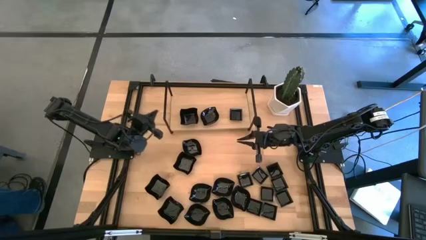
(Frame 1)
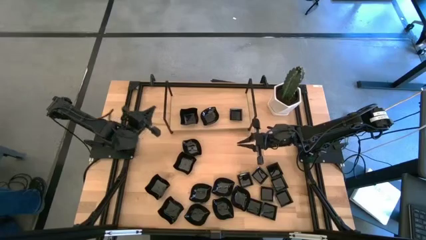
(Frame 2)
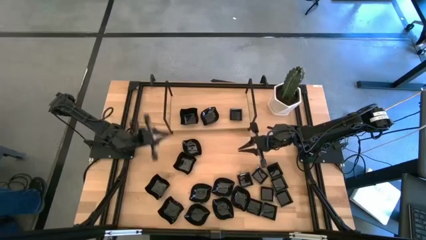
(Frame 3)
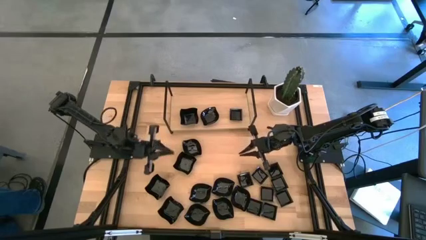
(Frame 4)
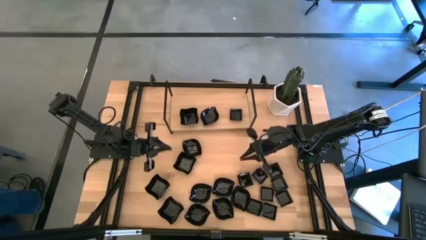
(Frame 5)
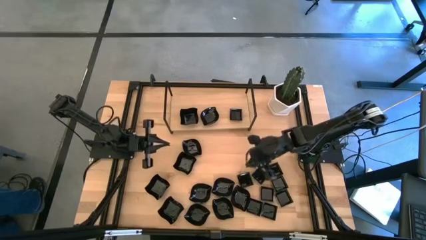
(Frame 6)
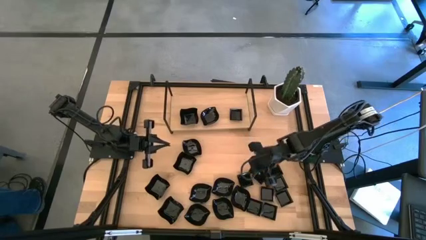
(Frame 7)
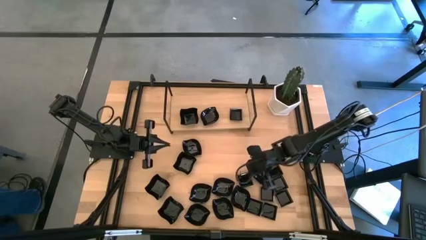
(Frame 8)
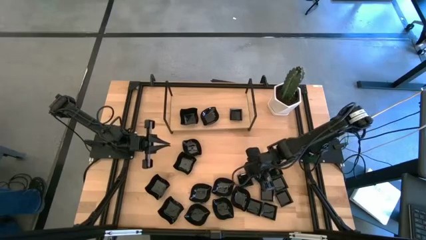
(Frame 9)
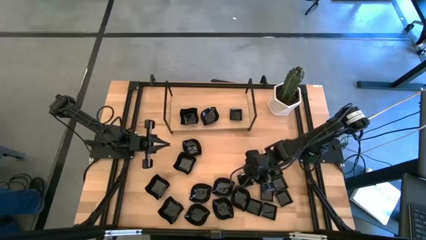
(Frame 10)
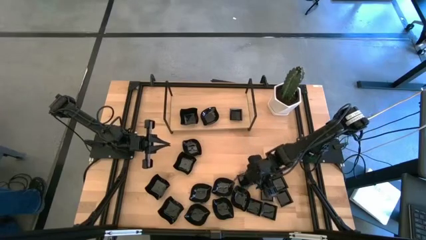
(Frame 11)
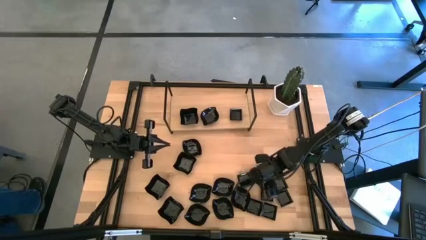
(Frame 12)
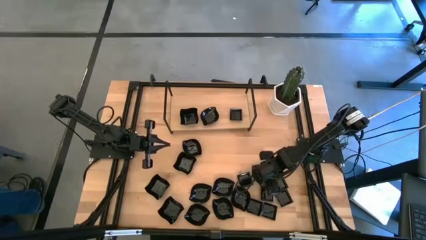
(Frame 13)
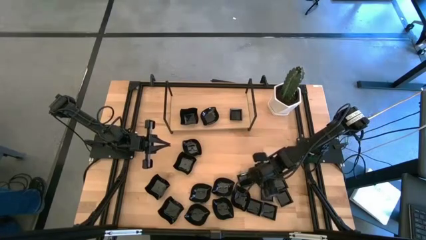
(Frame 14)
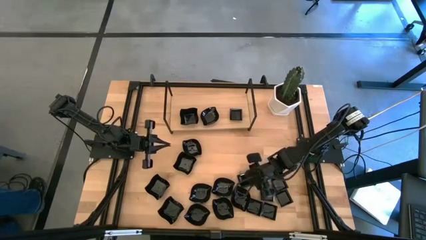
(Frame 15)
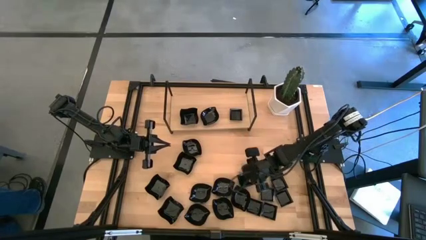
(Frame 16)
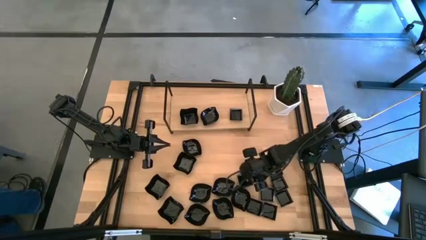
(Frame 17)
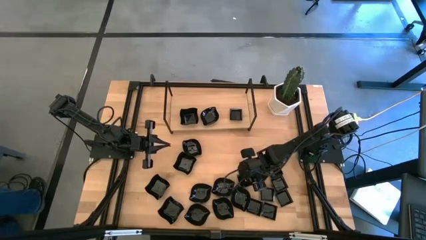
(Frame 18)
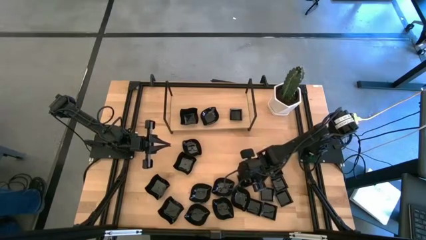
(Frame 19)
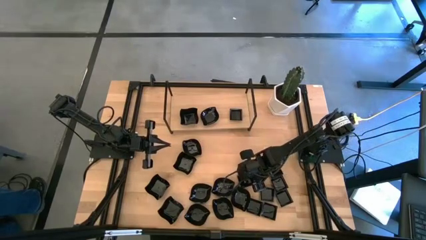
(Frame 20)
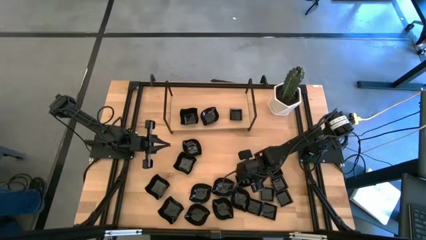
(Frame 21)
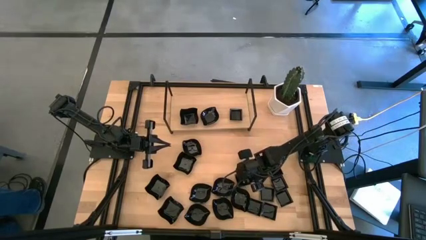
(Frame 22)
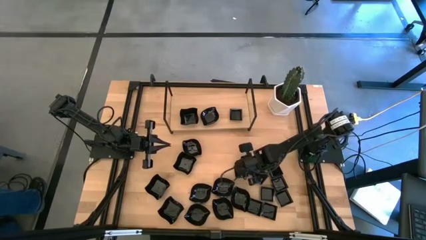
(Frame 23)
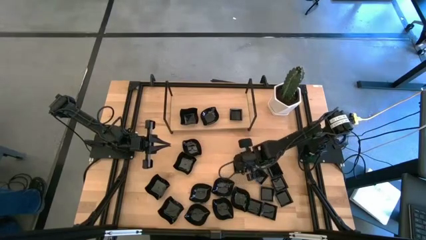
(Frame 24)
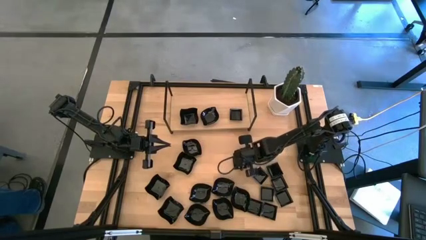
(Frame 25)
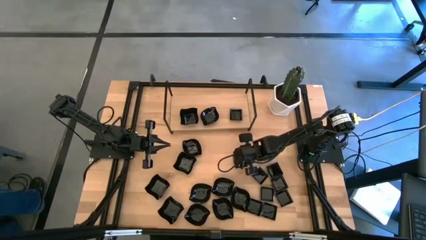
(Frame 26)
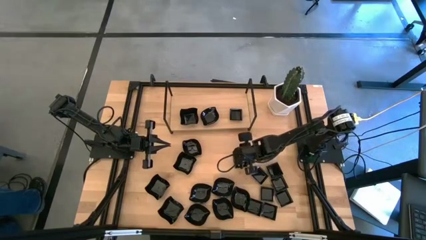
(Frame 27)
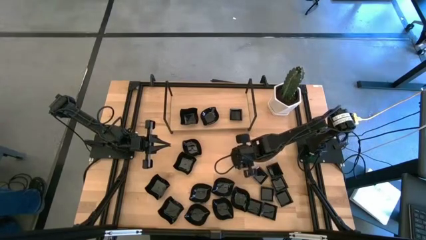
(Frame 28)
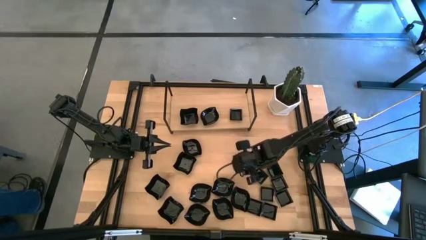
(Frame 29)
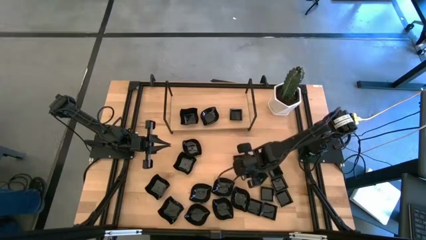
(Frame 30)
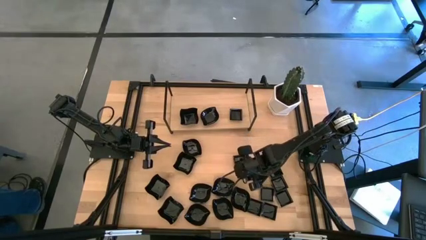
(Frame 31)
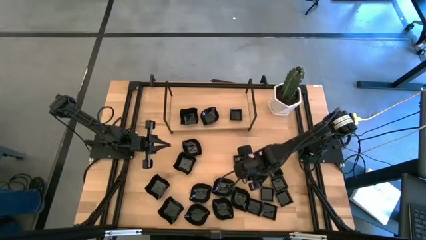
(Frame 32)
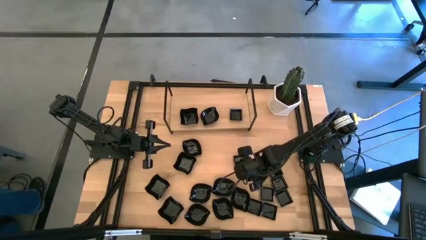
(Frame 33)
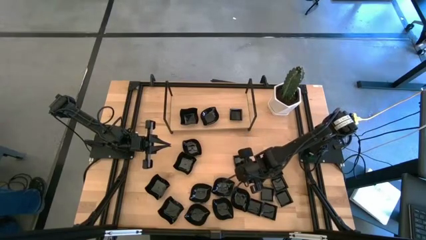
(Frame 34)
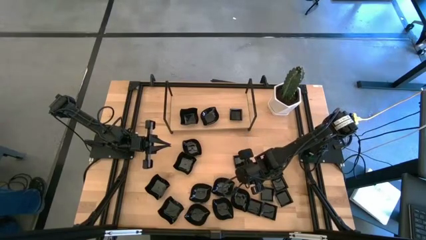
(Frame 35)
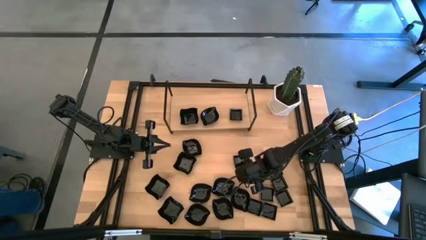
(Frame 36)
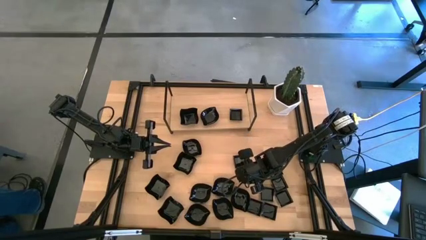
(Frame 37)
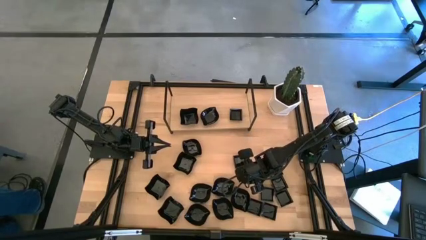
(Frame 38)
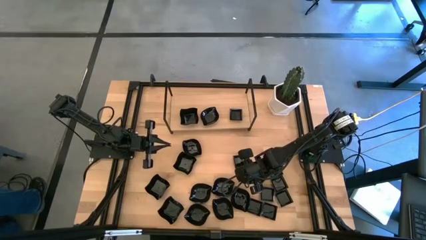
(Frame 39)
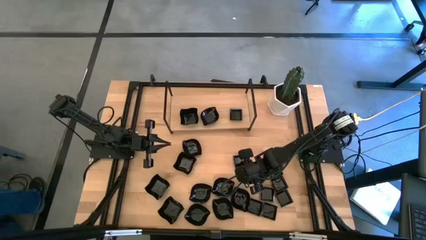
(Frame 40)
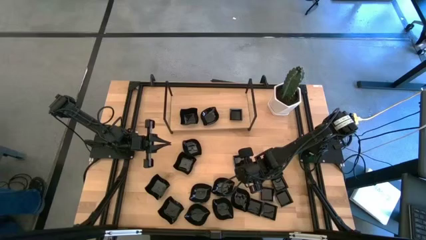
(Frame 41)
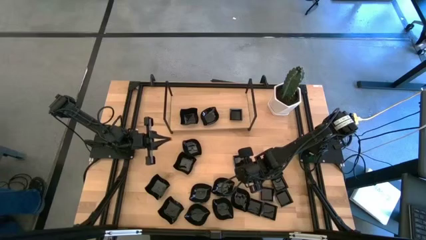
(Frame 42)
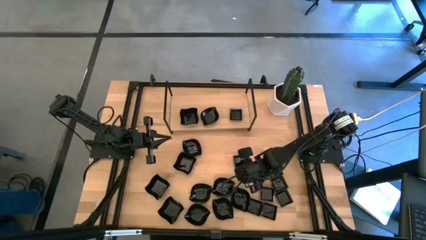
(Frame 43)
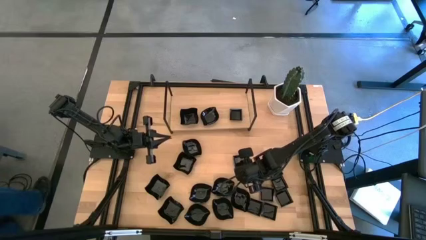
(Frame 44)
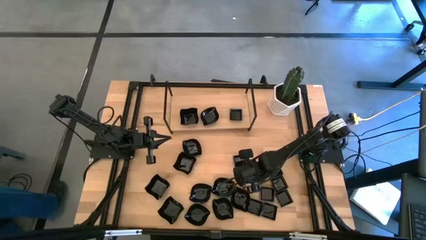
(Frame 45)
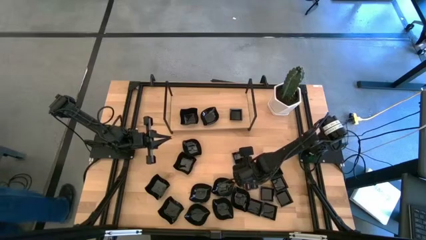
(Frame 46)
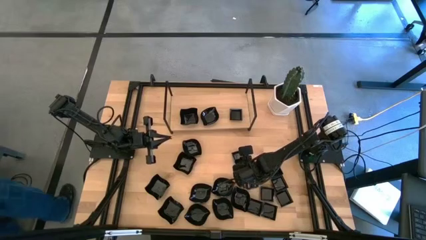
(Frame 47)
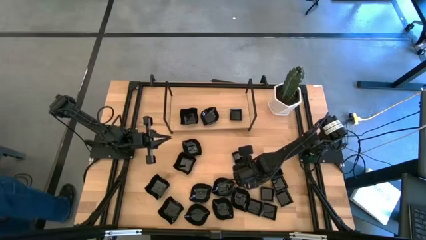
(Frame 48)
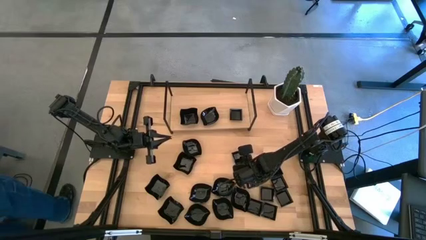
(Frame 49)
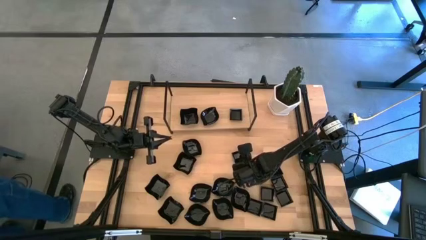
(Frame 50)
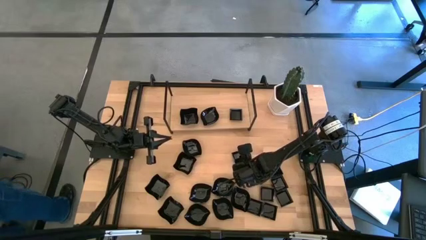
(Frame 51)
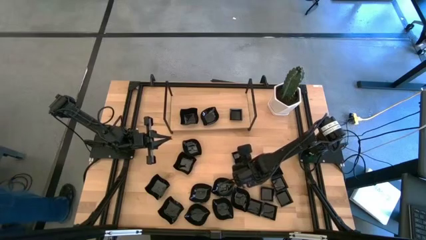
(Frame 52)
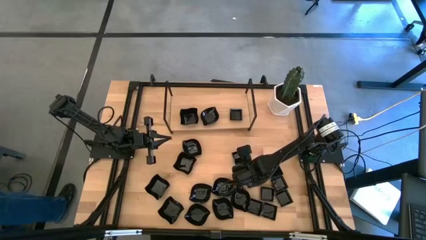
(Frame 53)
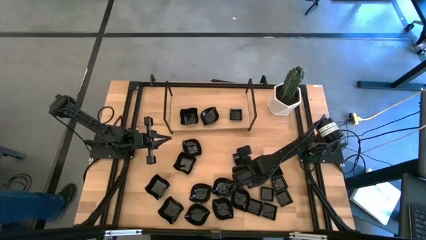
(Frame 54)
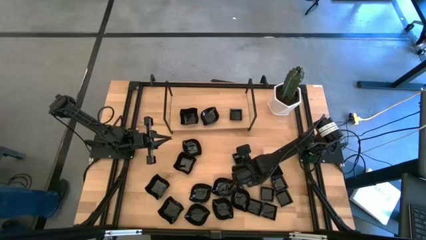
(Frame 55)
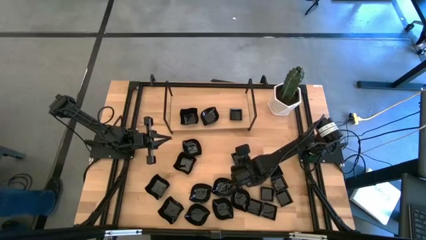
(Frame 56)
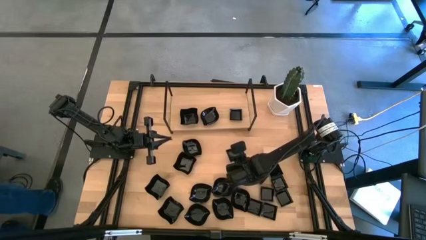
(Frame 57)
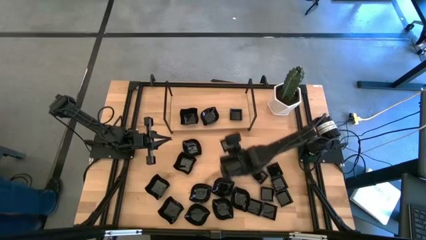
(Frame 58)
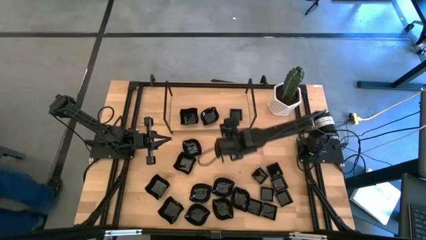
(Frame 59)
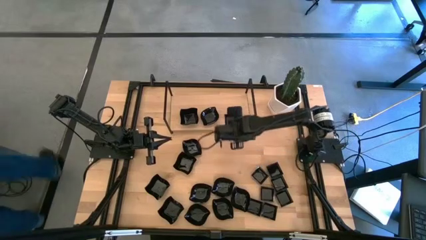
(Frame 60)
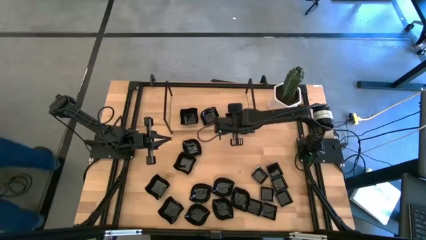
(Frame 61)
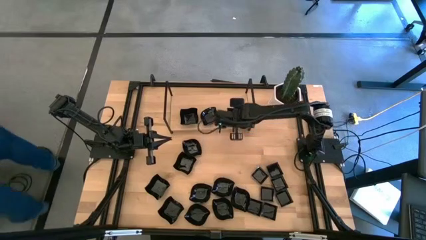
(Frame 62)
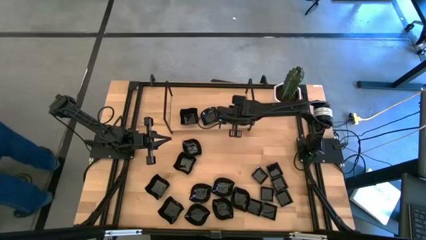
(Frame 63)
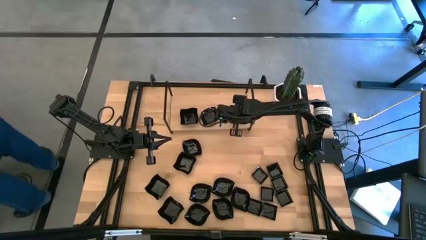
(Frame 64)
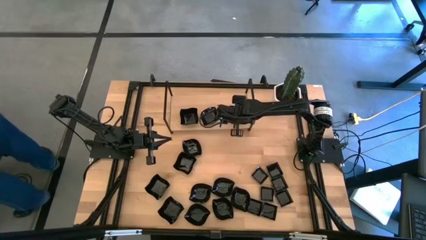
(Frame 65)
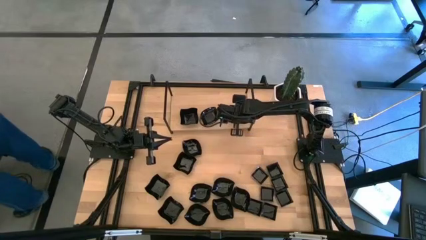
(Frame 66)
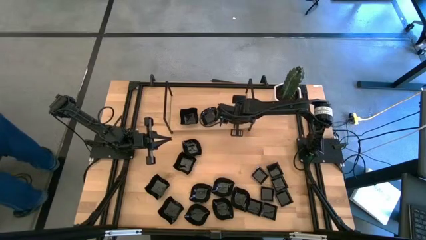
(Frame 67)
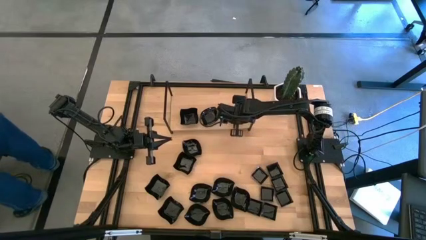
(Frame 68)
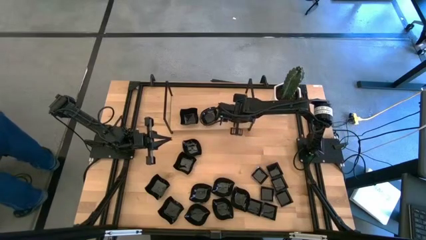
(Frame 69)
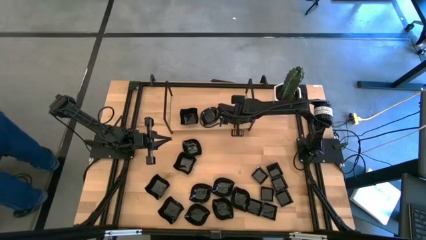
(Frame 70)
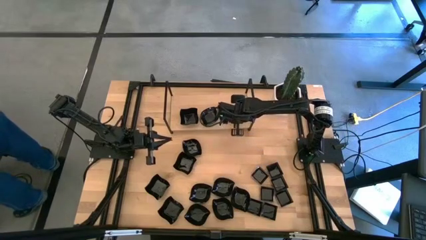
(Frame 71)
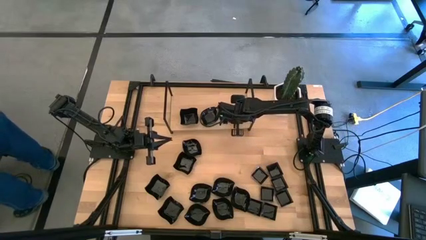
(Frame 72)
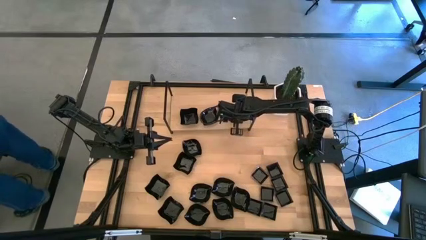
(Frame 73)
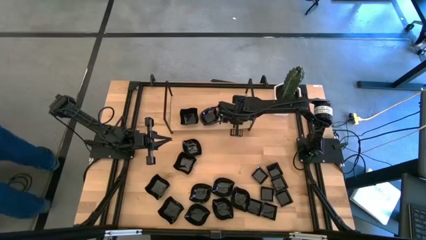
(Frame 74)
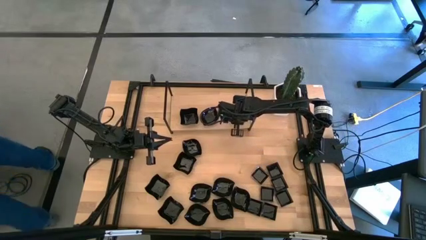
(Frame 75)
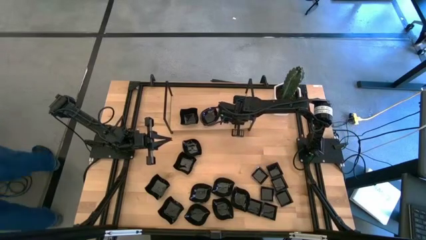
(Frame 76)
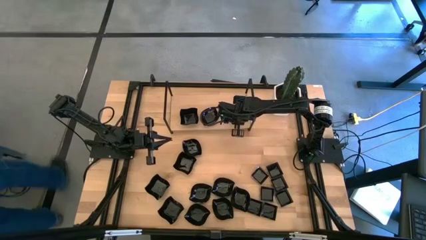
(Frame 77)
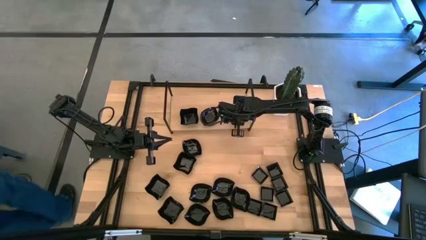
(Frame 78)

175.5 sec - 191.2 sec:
Task: Pick & Place Mini shaped plates
Stack the square plate on the top of the square plate on the shelf

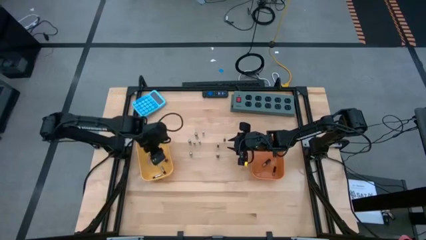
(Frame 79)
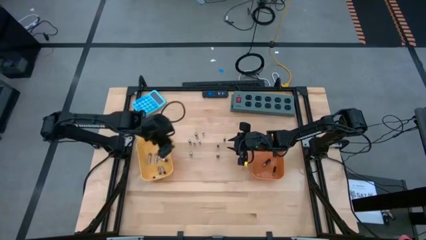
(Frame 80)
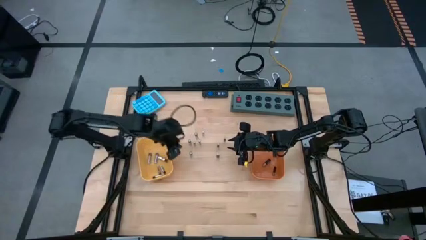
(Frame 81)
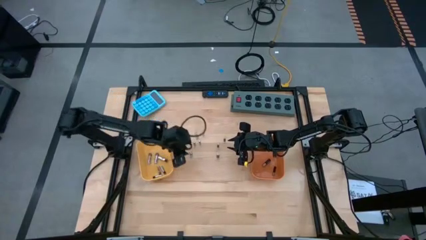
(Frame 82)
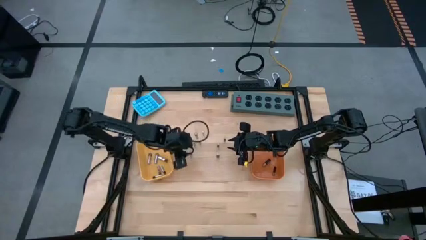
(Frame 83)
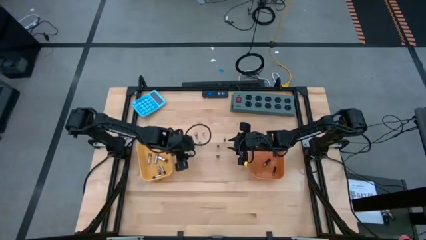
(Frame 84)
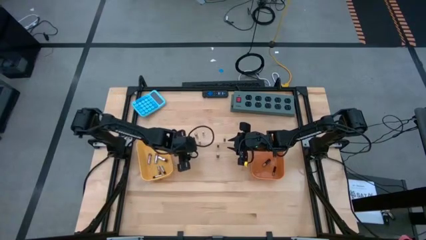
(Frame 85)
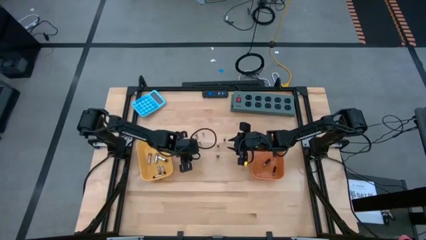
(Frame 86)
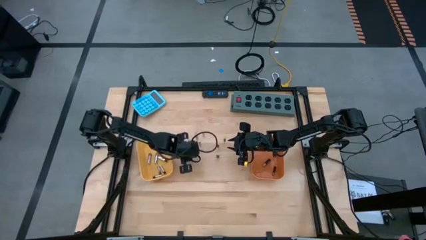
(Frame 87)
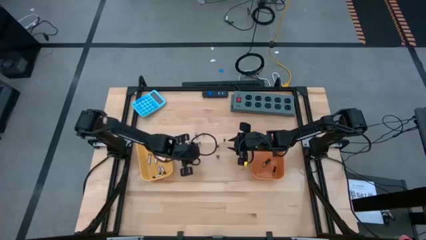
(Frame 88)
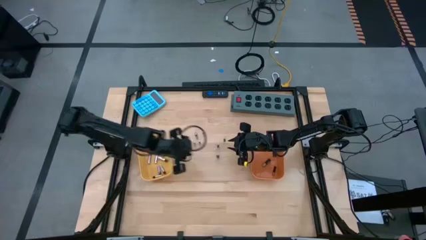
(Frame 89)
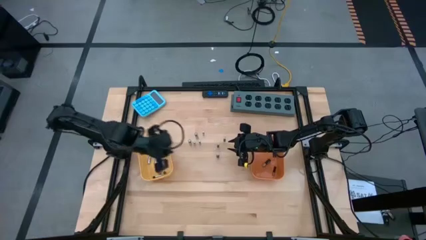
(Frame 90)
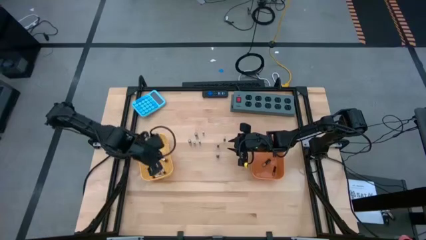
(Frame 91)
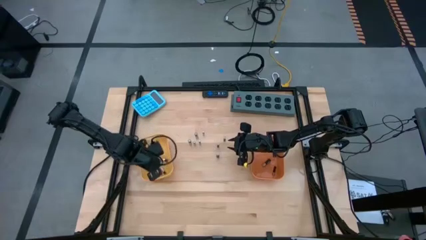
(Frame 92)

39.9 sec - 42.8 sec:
Task: Sort batteries
Put the silver battery into the yellow bin
